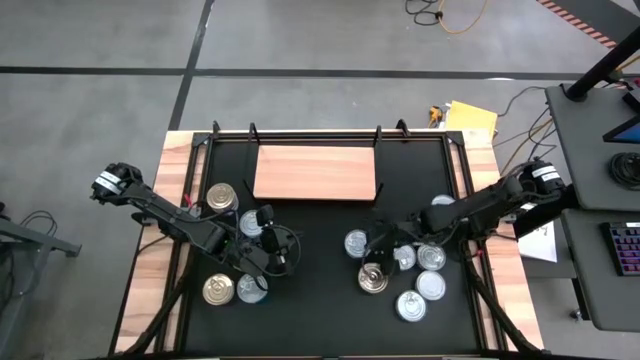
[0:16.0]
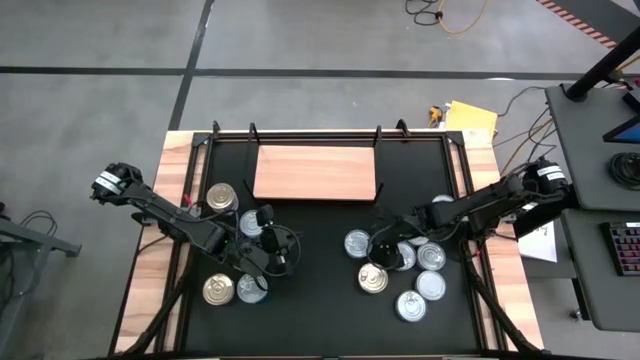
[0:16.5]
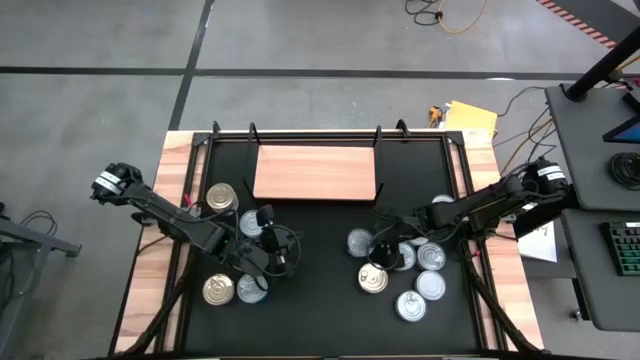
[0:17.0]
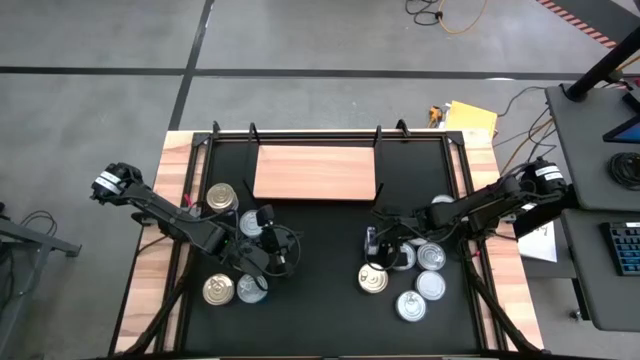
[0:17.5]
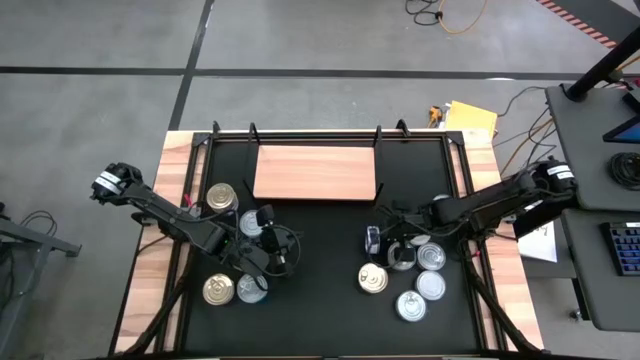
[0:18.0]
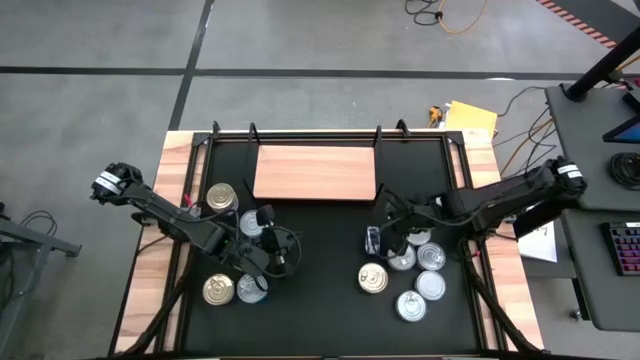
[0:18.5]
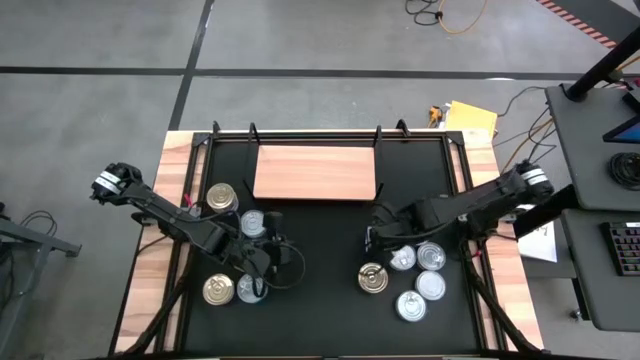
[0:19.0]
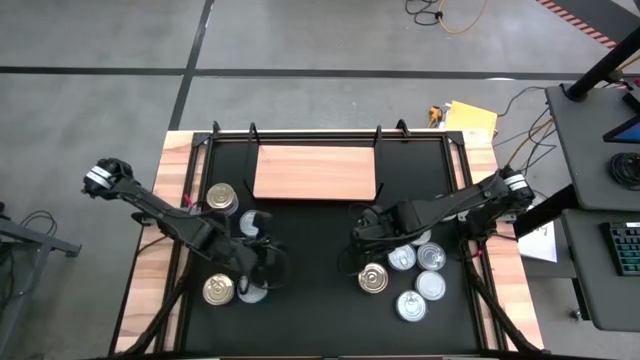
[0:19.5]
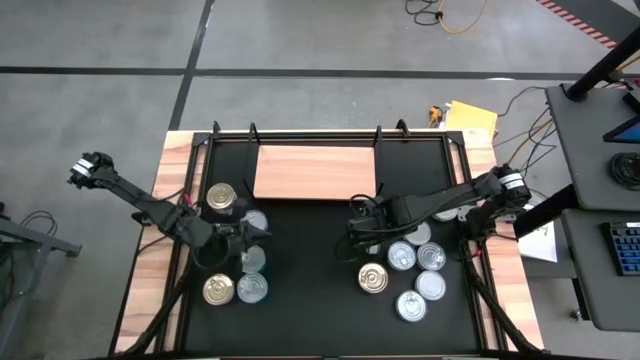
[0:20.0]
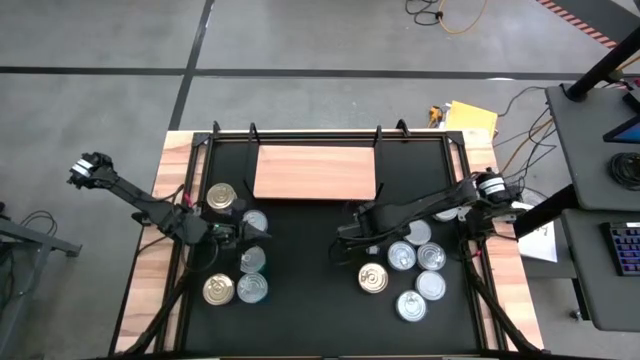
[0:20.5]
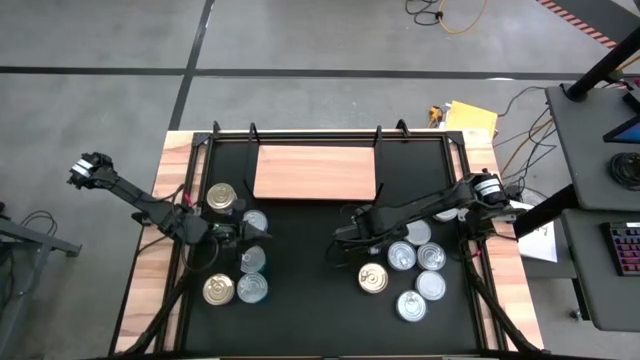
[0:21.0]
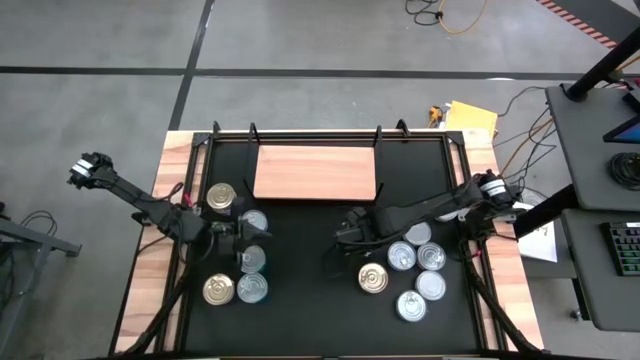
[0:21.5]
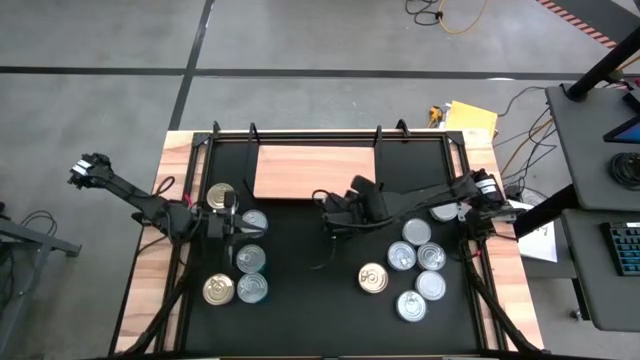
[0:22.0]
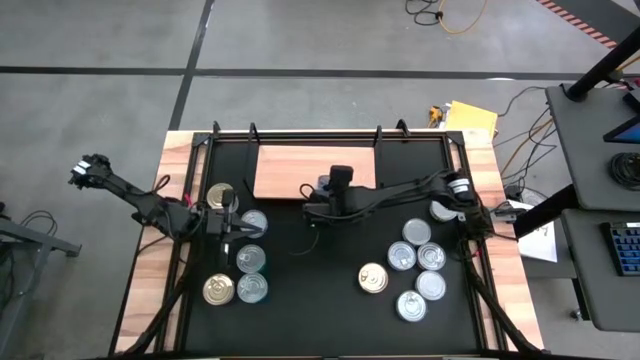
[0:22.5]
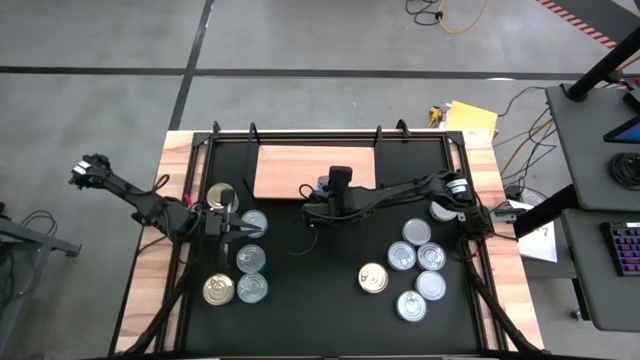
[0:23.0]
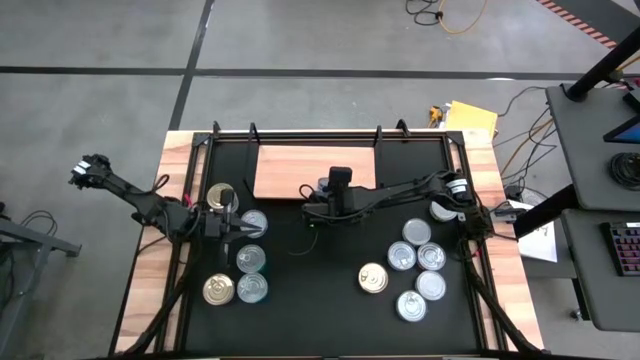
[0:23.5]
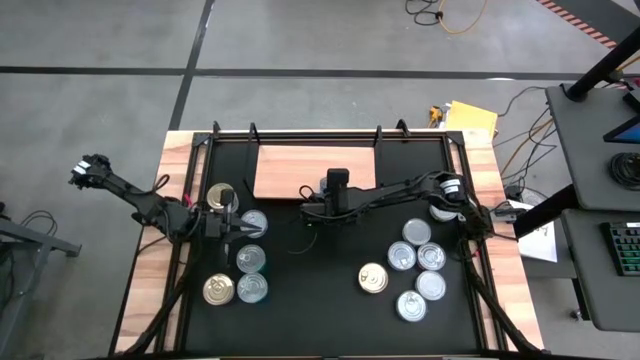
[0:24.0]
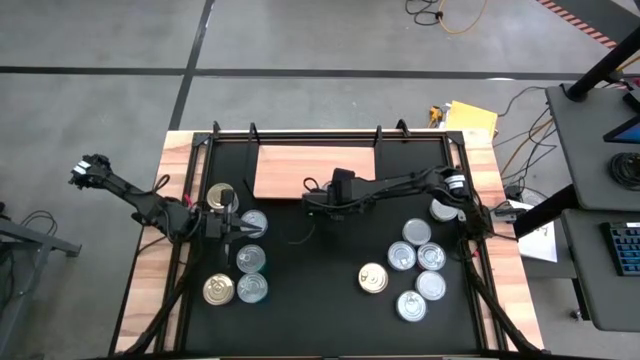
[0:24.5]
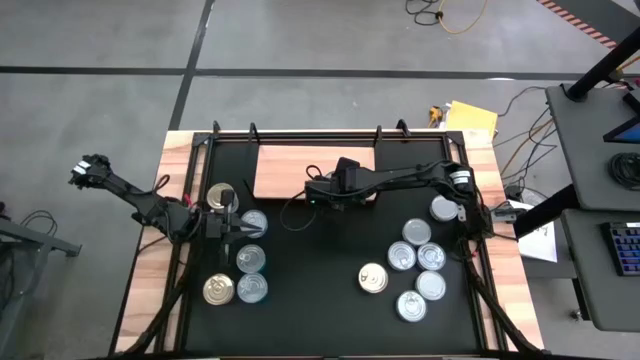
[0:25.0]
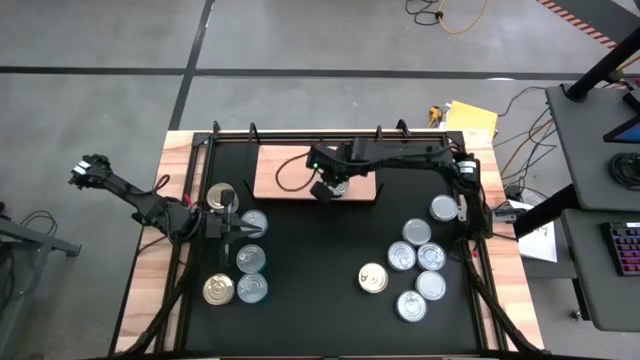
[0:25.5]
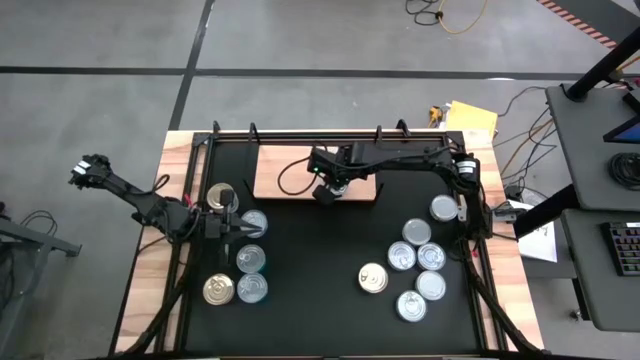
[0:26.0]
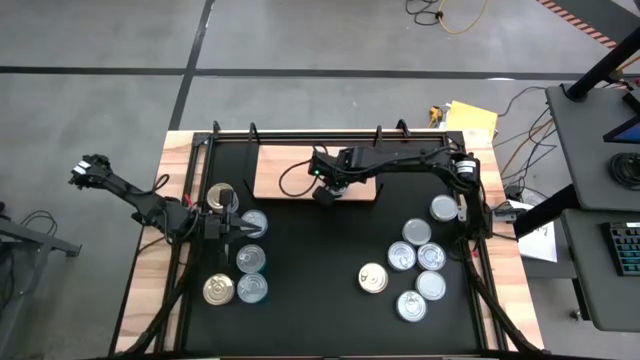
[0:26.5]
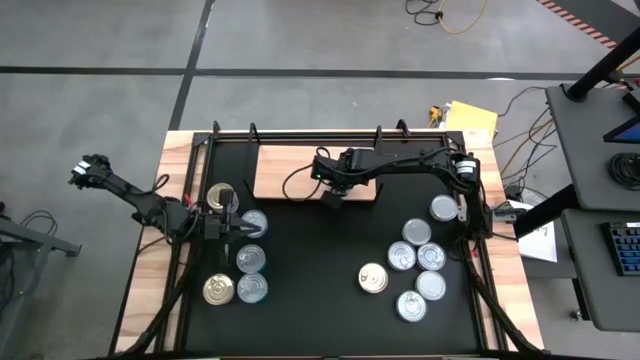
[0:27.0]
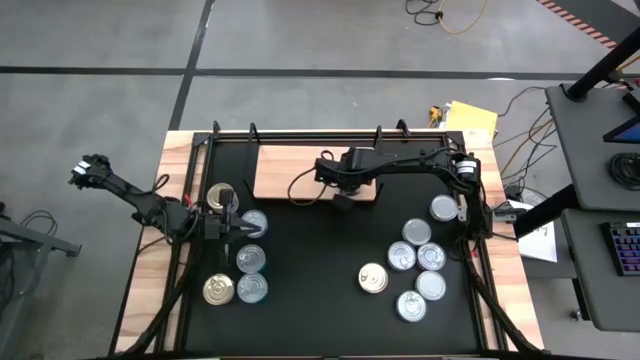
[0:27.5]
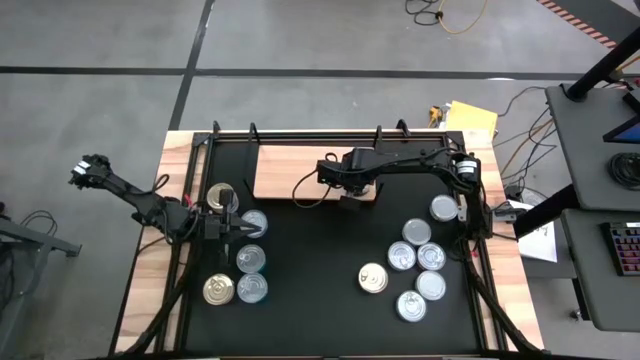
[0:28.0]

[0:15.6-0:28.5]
Task: Stack canned seafood by type on shelf
Put the blue tuna can on the shelf

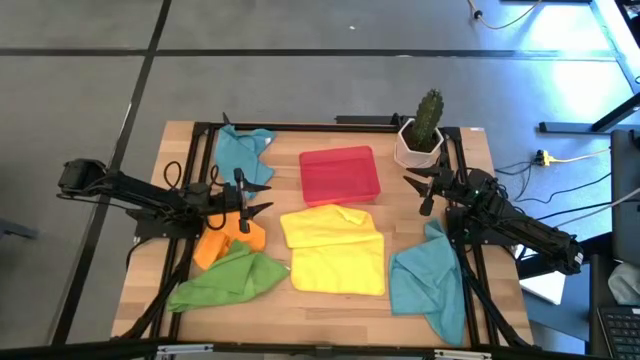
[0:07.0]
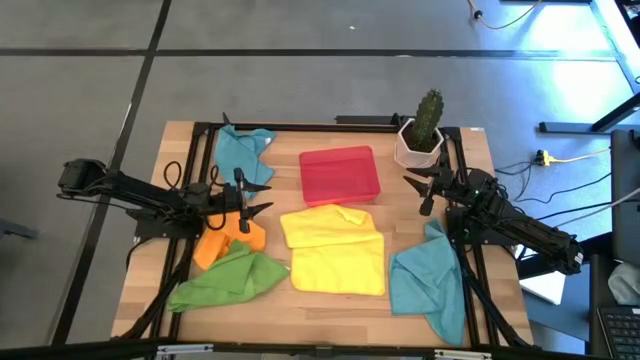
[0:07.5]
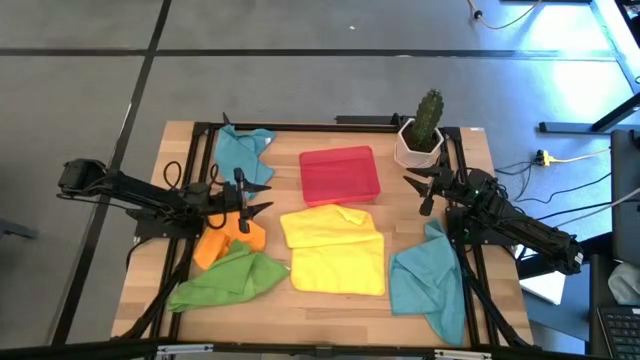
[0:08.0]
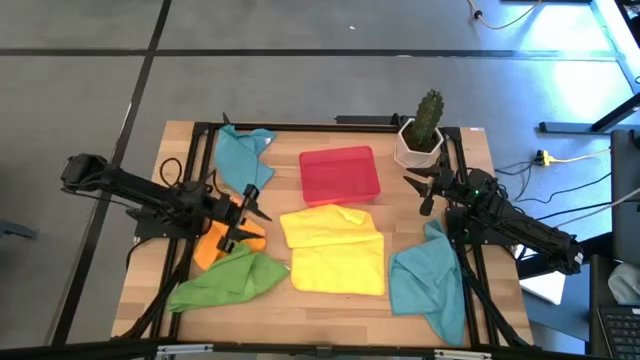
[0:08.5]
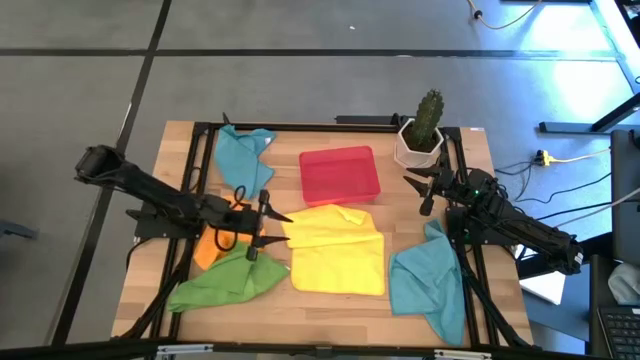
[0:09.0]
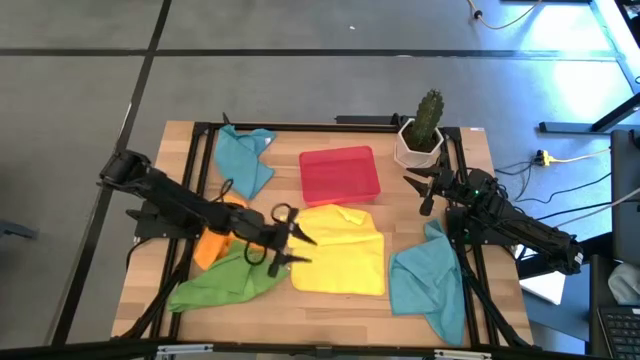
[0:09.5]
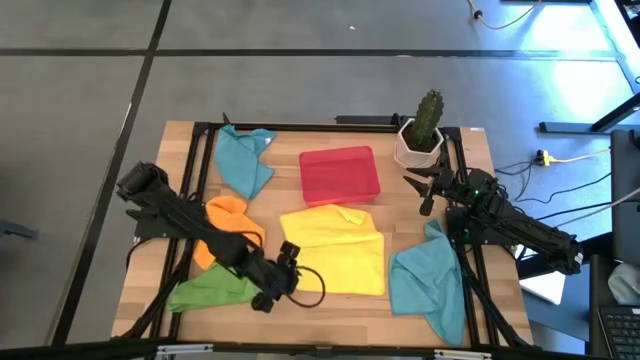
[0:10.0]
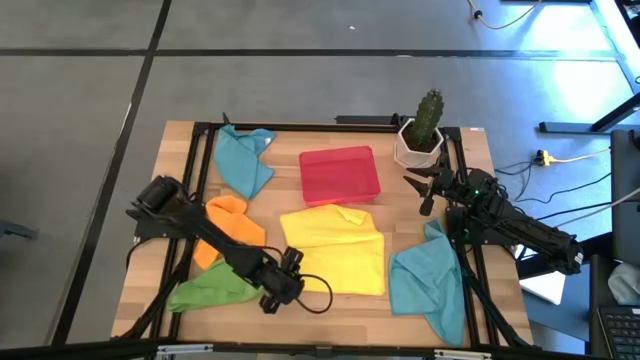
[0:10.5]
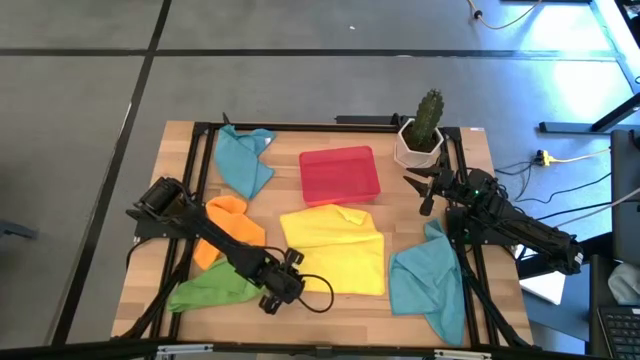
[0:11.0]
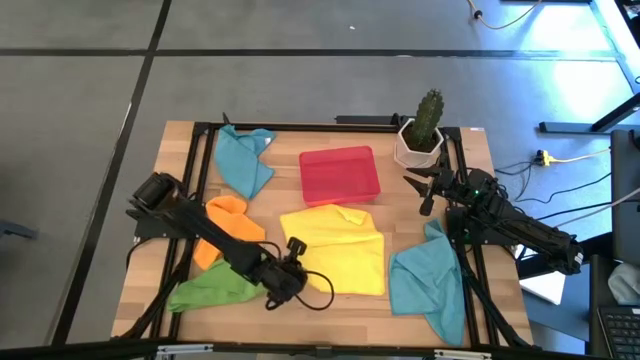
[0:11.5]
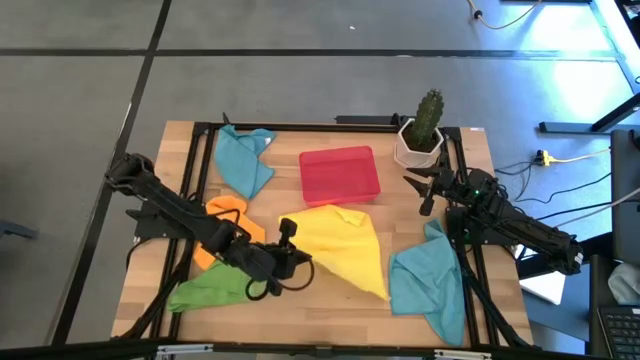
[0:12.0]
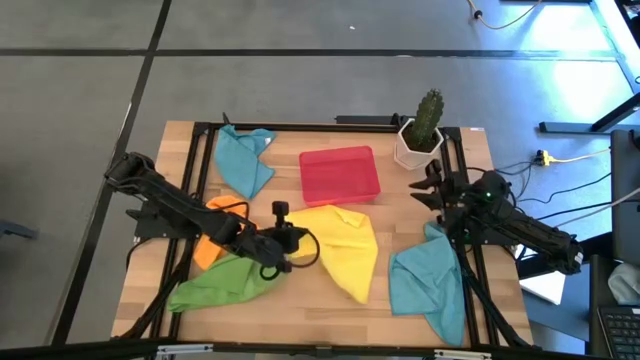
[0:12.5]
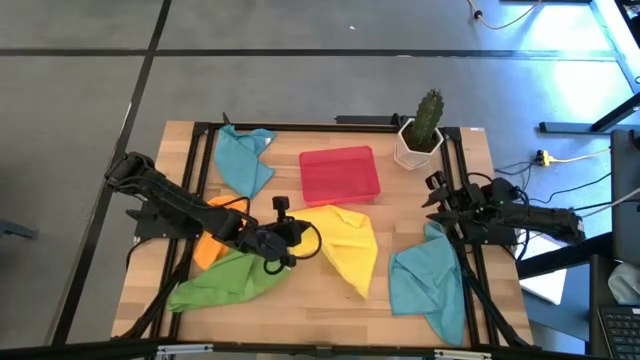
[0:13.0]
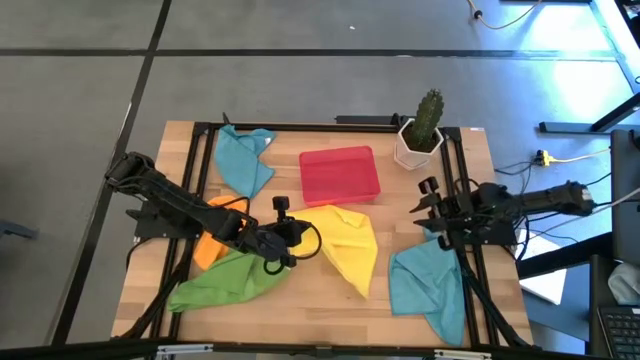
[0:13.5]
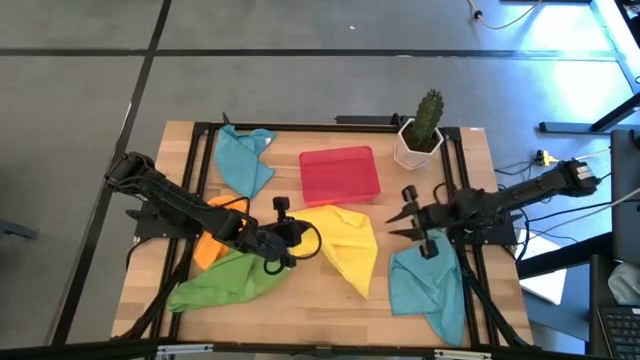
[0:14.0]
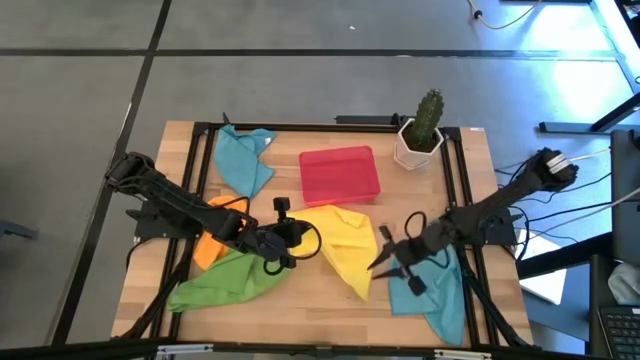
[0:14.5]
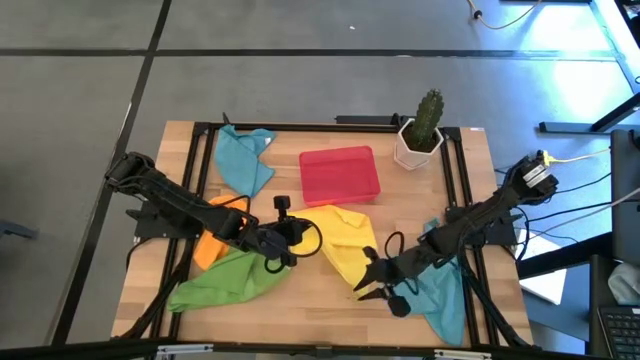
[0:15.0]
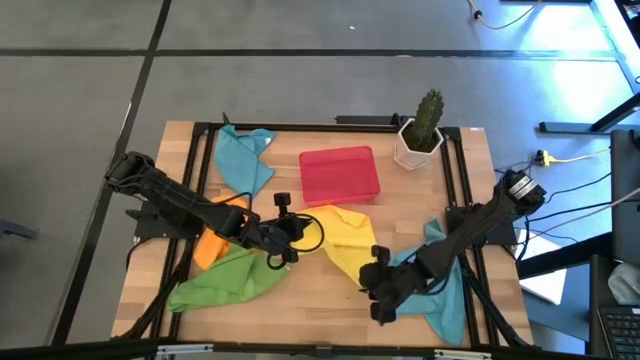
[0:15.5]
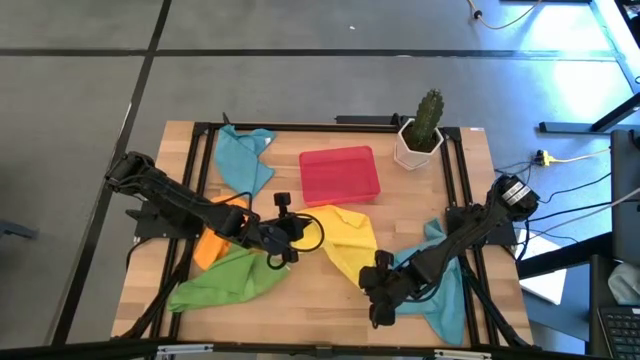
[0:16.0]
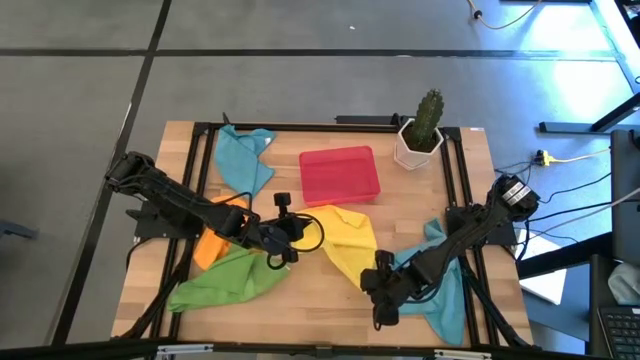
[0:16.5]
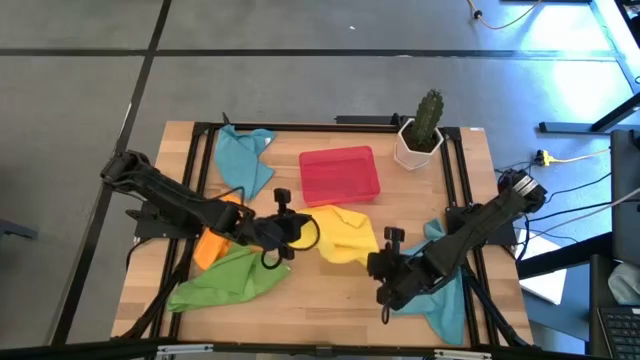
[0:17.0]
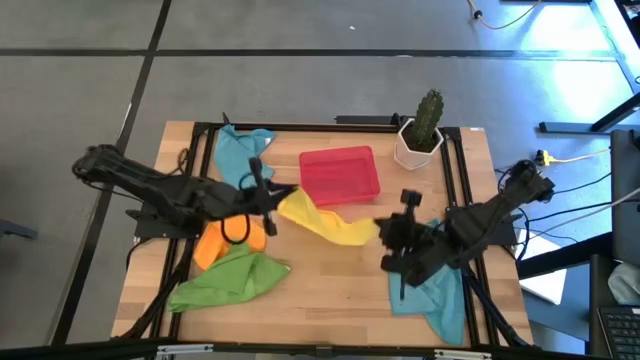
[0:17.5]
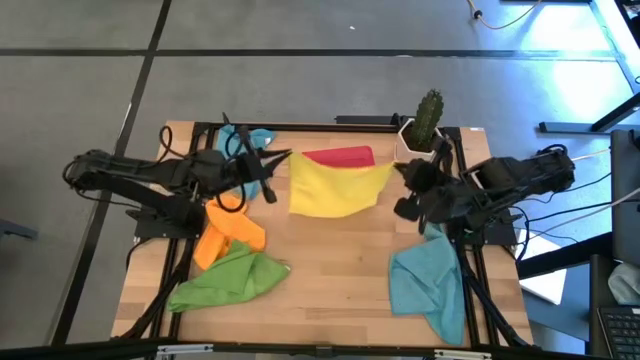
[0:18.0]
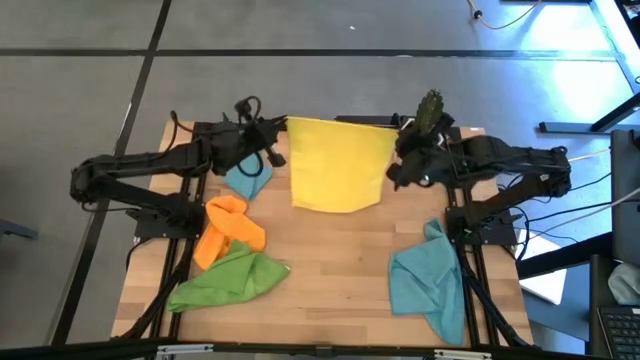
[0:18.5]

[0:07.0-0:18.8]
Task: Roll microfiber towels into tight, uniform cylinder then place into a basket
Roll the yellow towel
